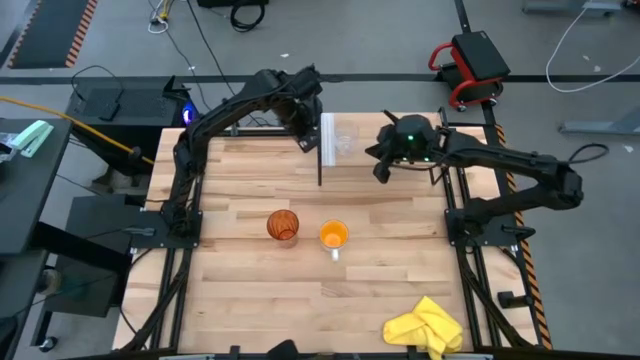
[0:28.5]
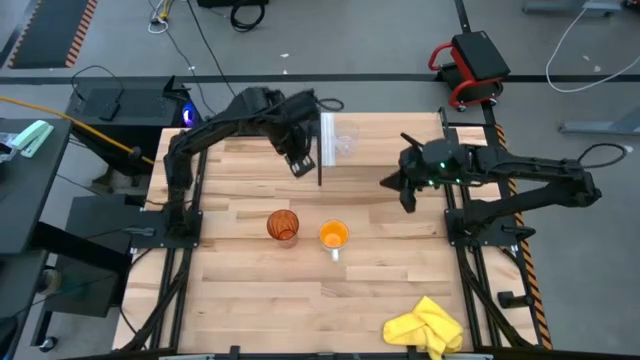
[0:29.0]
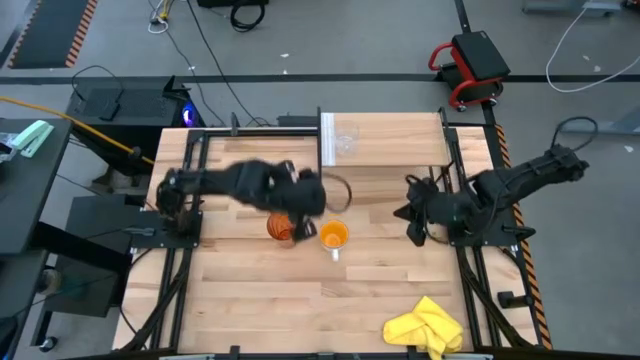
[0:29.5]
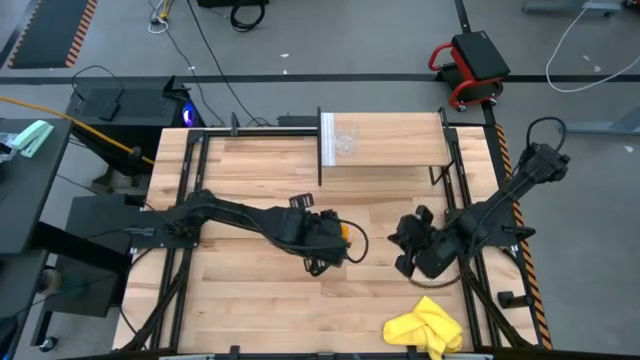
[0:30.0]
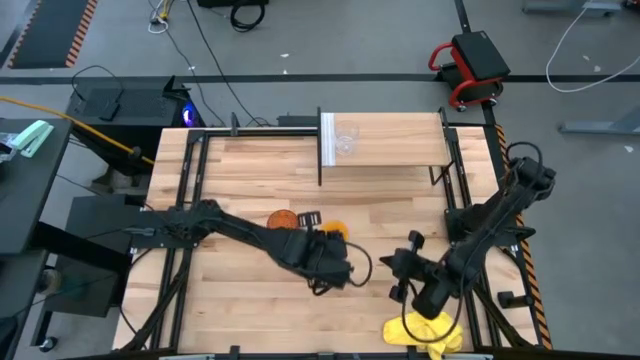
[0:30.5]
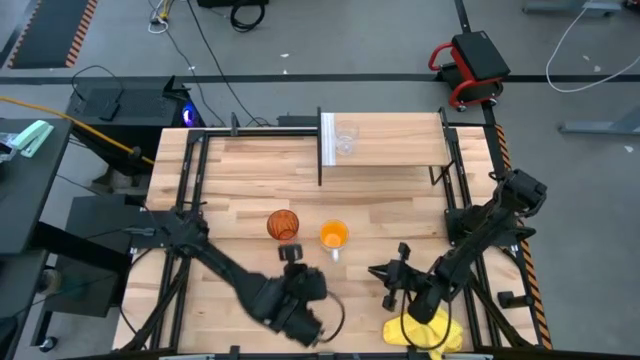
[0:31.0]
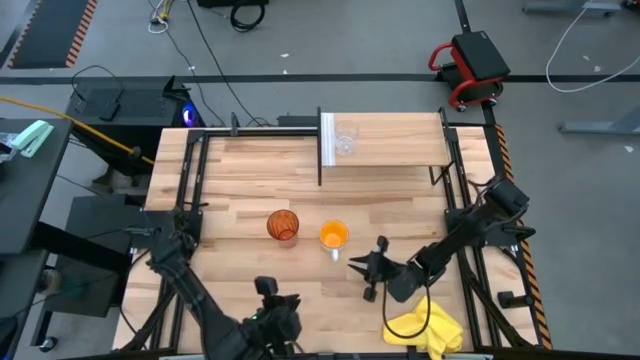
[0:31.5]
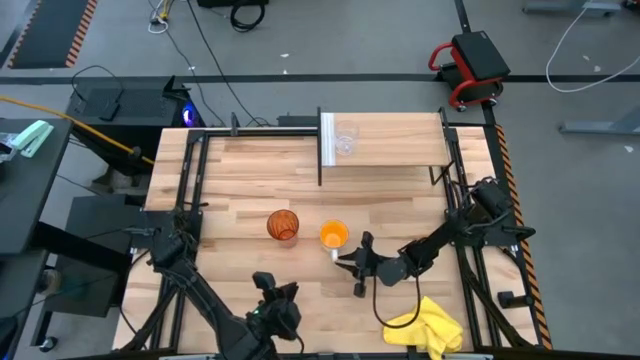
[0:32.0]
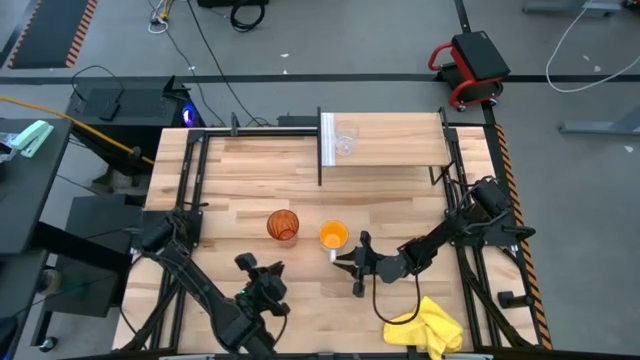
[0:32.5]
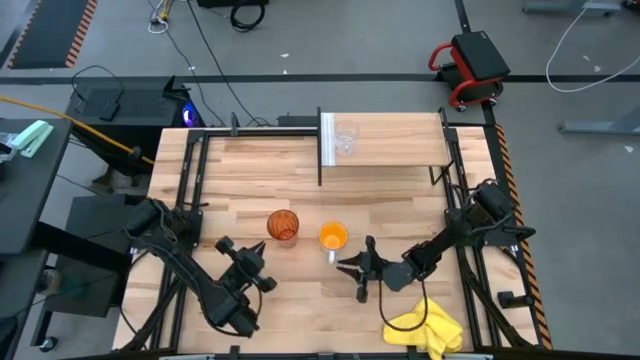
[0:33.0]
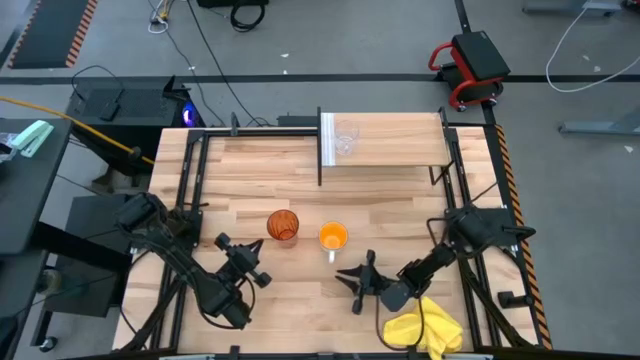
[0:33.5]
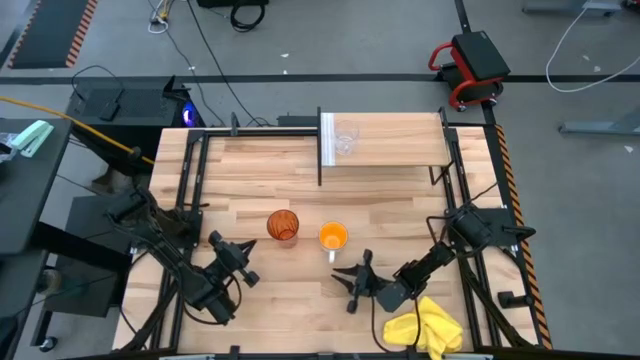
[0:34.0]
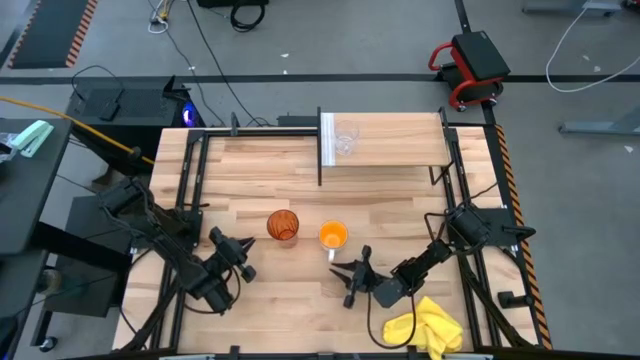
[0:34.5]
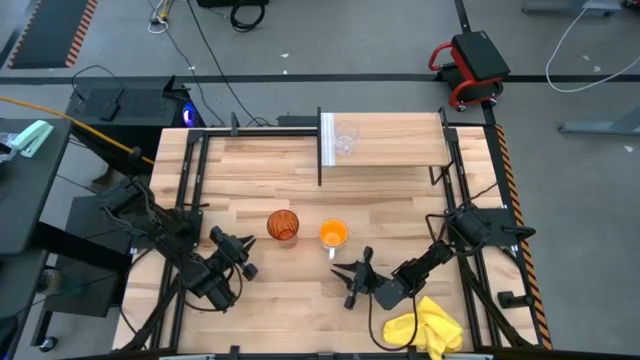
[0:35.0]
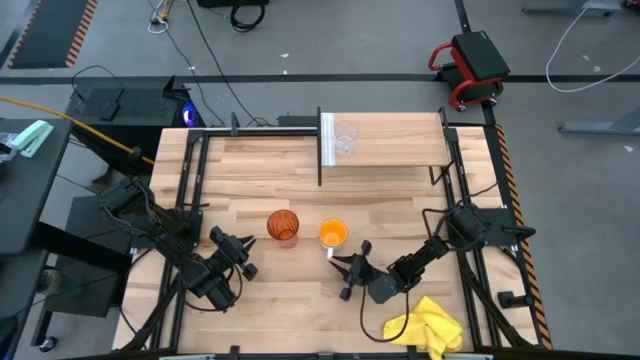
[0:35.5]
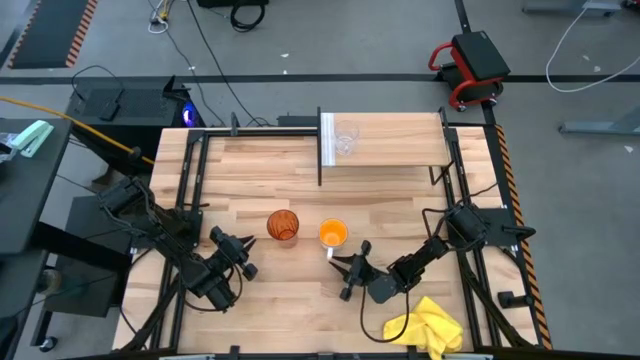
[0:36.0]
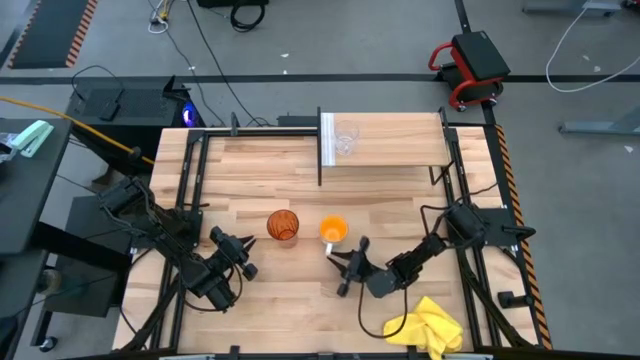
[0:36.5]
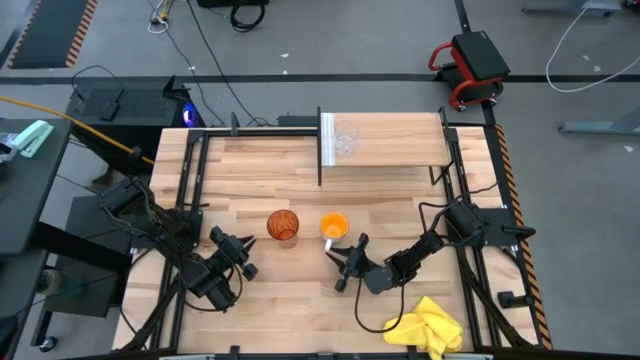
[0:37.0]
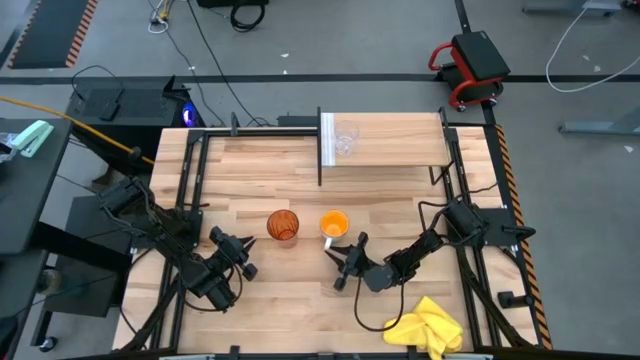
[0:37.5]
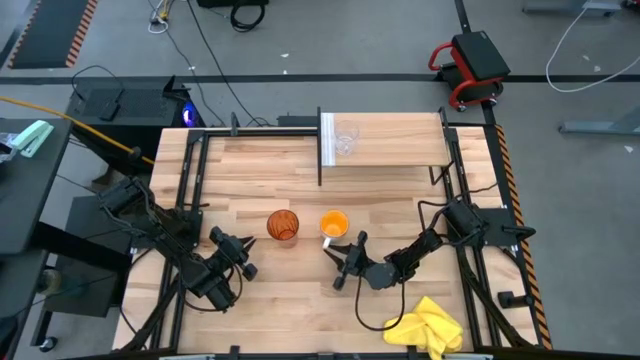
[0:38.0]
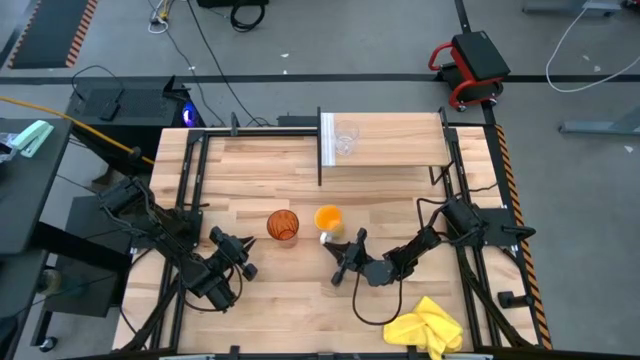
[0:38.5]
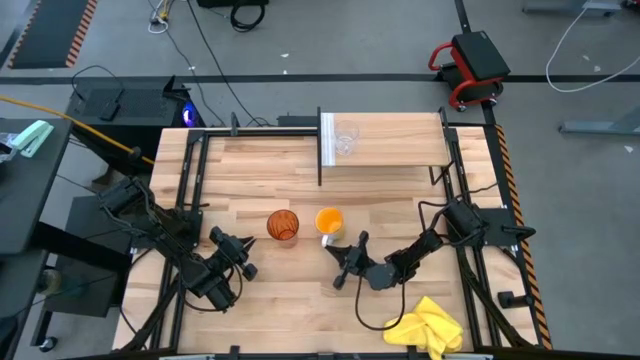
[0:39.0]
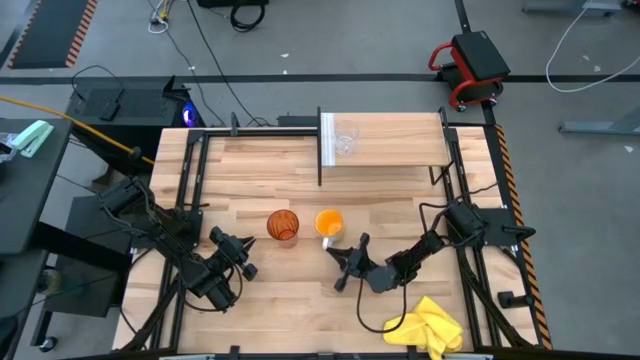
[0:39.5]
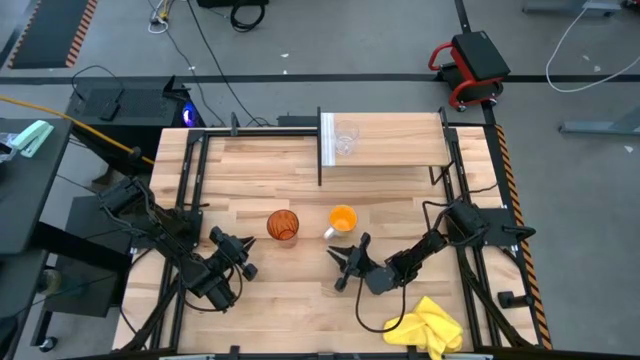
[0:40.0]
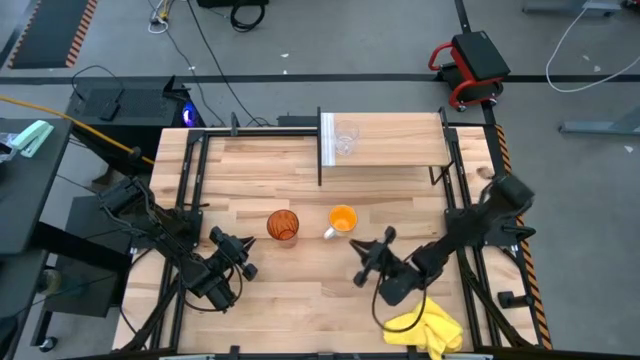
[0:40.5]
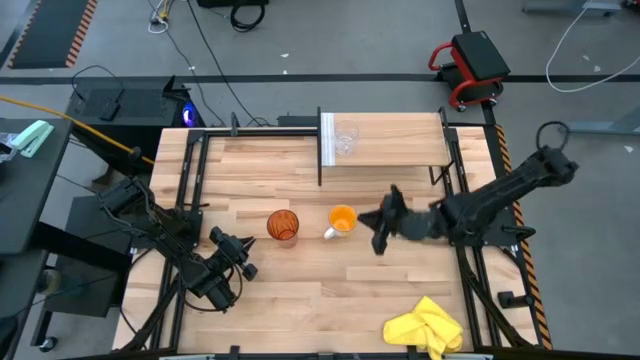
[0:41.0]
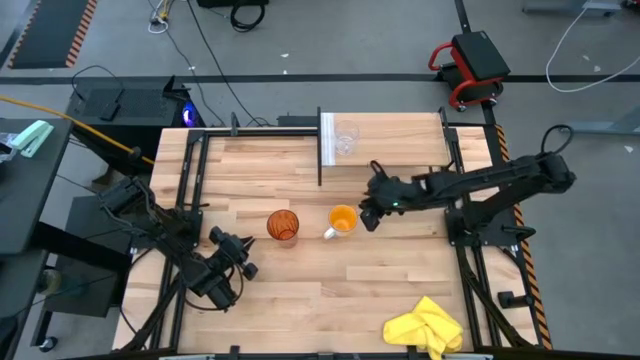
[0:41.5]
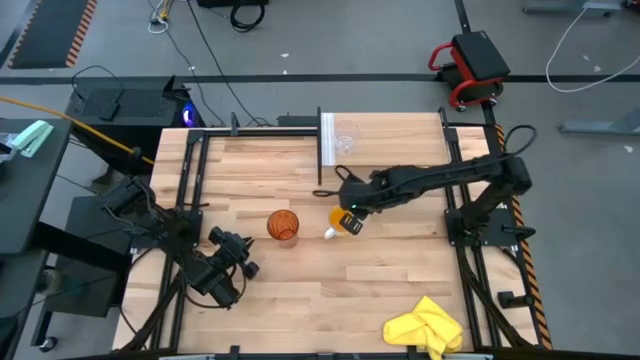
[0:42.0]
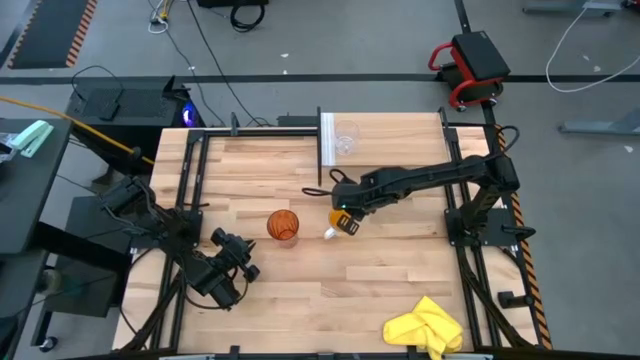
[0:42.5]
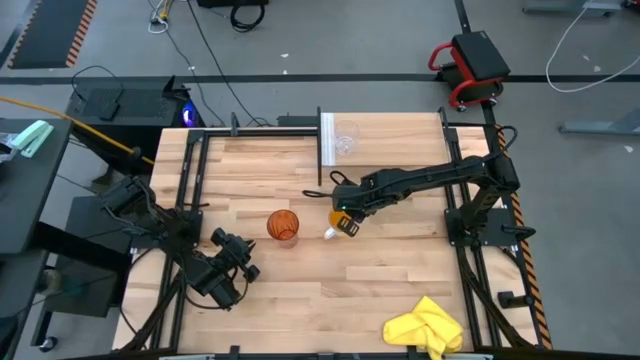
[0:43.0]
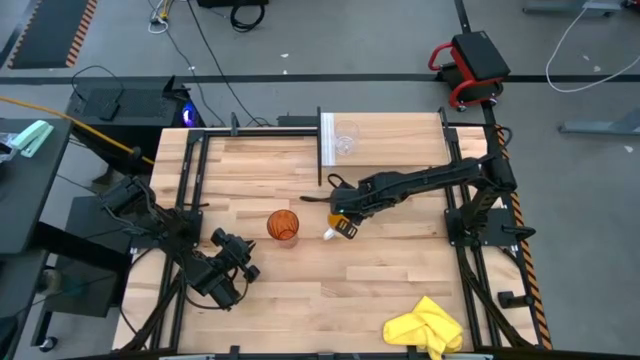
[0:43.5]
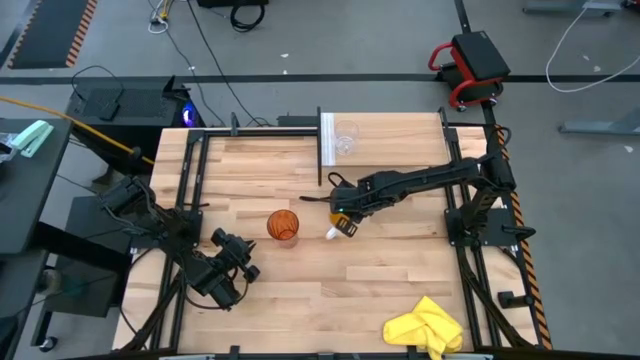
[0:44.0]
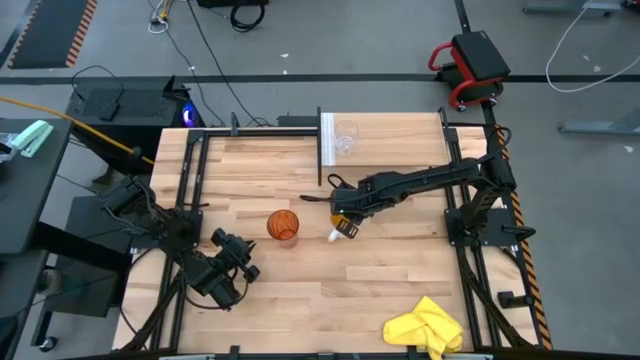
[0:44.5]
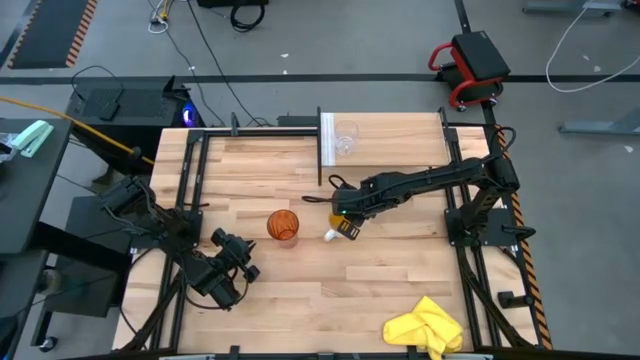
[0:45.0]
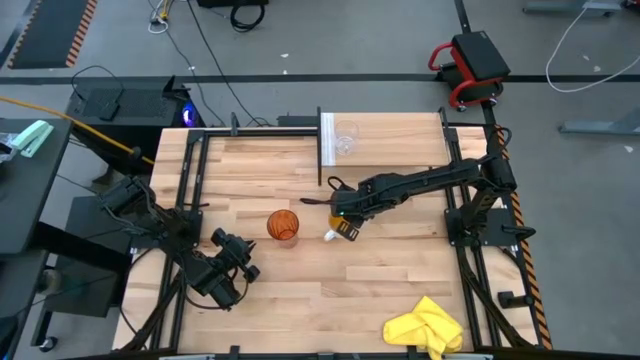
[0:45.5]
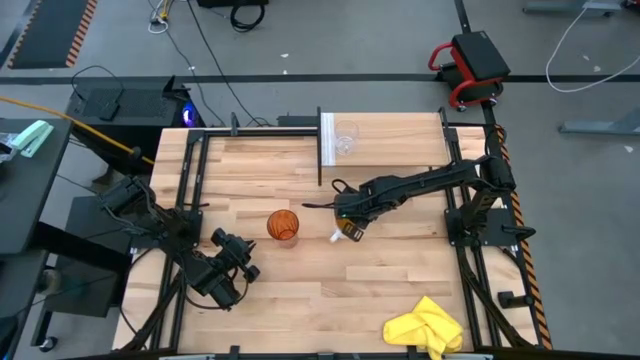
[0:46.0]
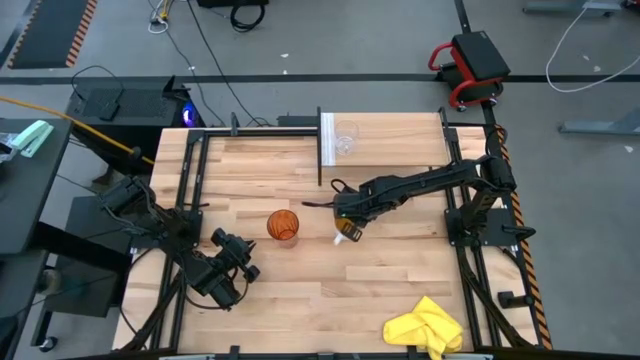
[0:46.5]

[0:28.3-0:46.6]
Task: Stack small to large cups/mugs on shelf
Put the yellow cup on the shelf

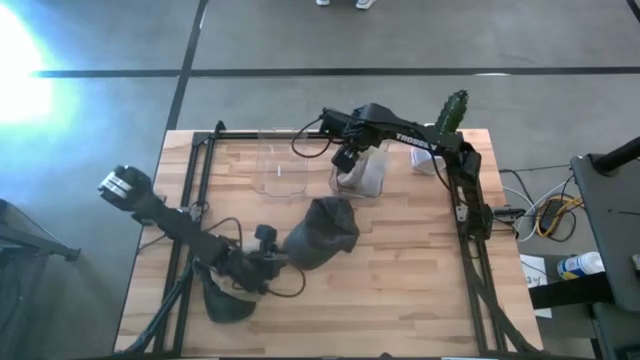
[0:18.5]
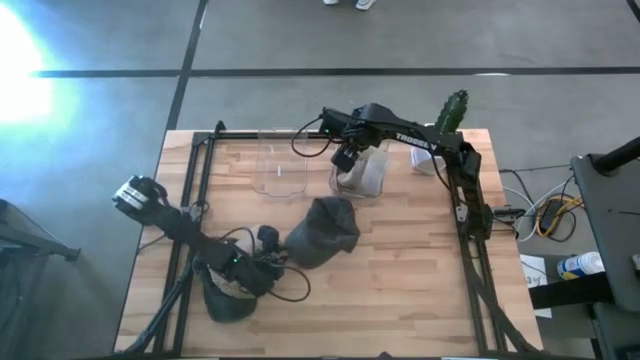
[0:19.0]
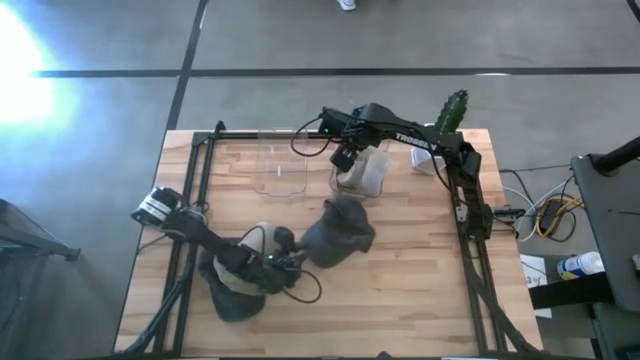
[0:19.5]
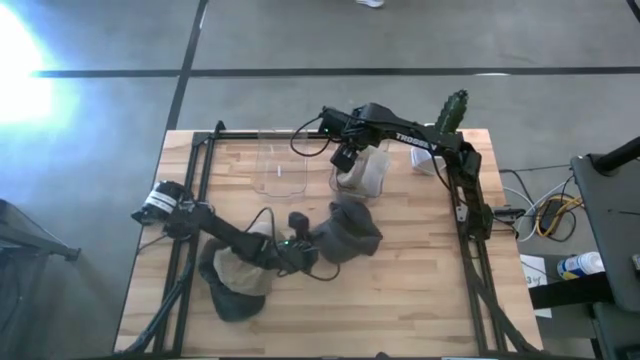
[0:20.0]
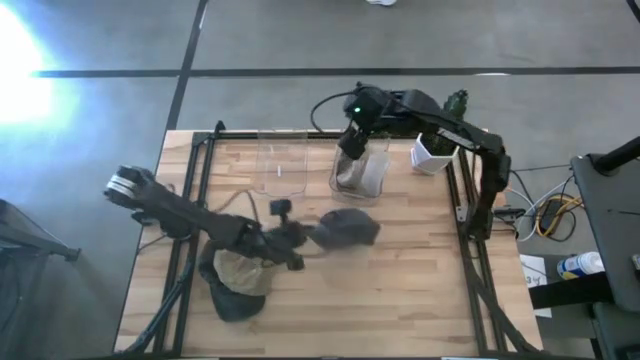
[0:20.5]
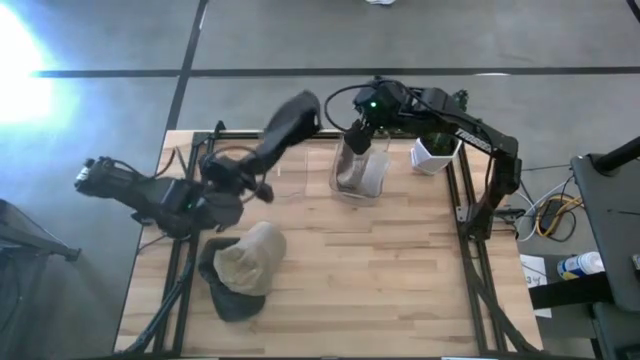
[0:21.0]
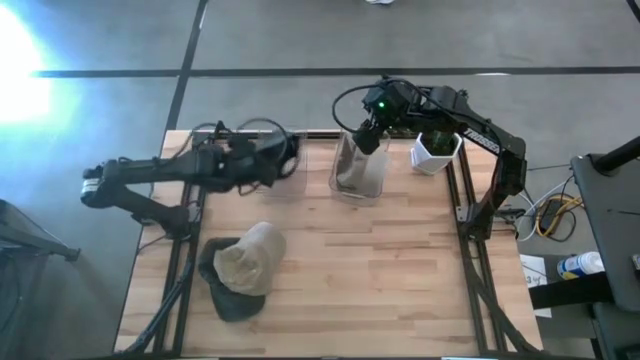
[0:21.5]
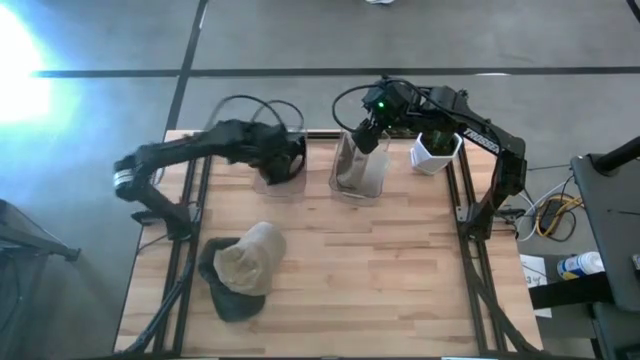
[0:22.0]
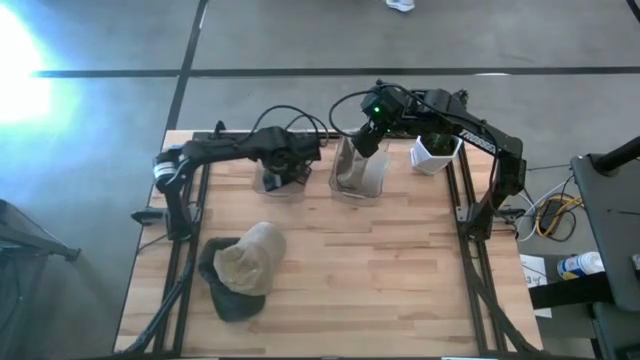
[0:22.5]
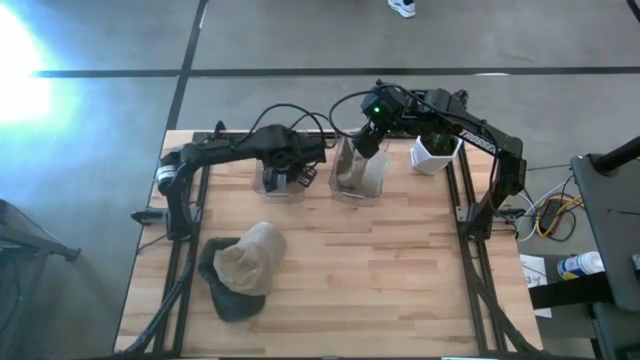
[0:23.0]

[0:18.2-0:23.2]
Task: Pick & Place hat
Put the middle black cap into the left transparent bin
